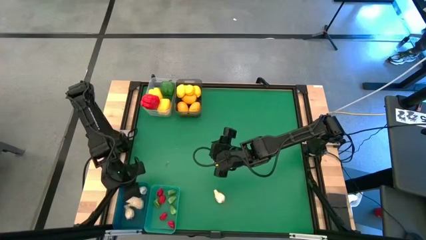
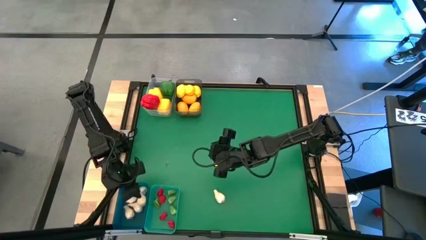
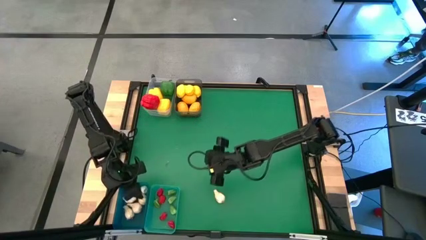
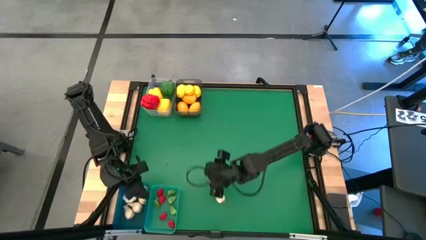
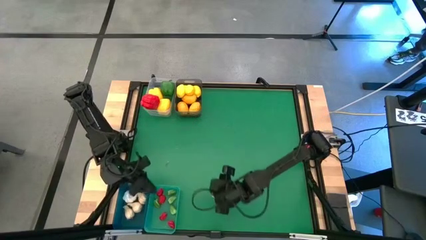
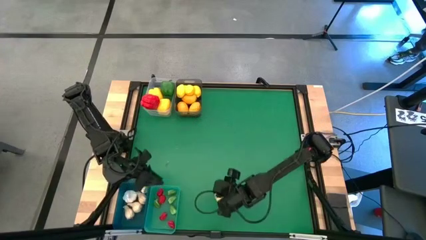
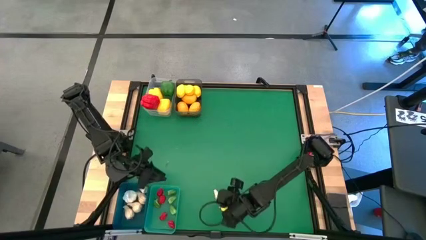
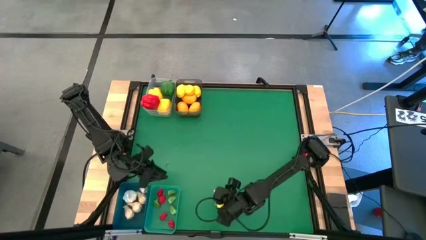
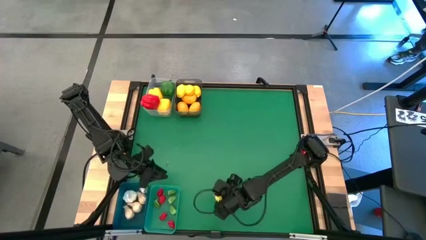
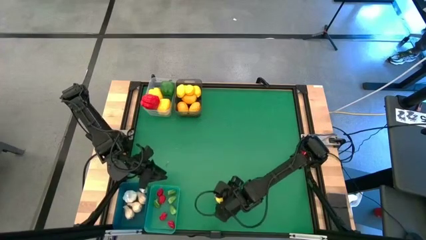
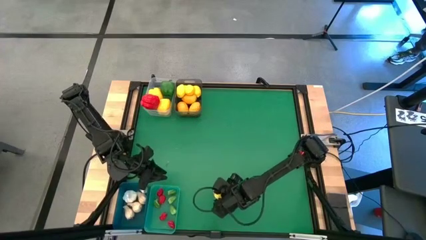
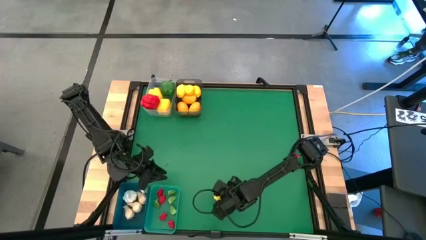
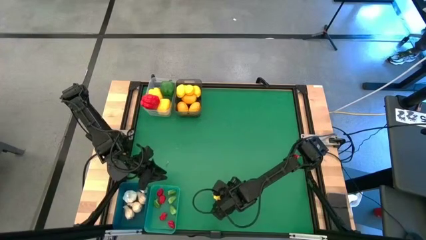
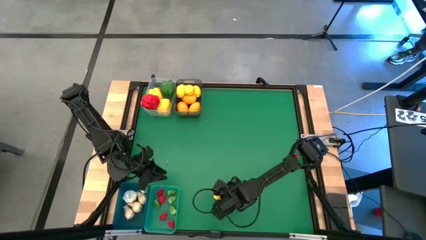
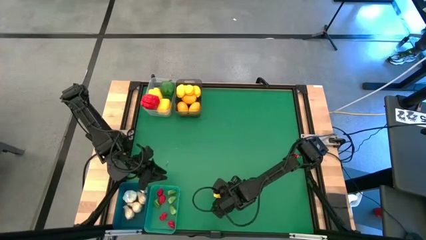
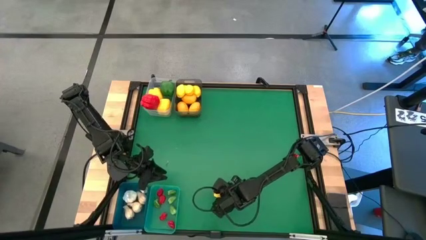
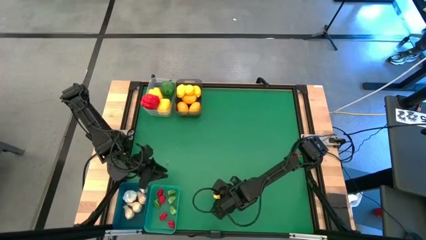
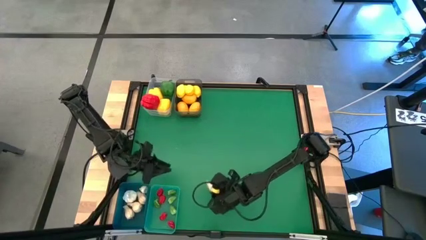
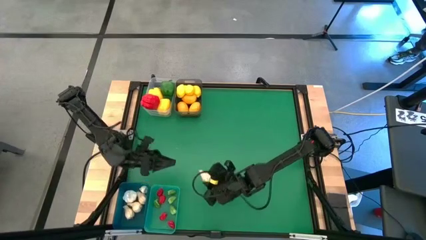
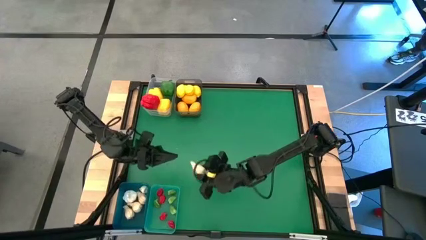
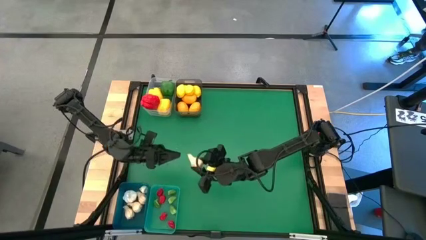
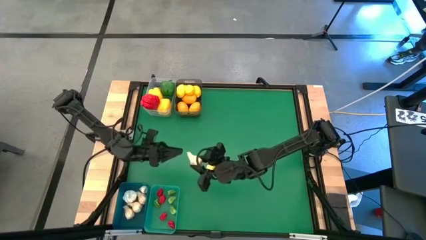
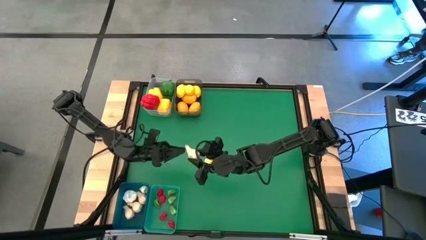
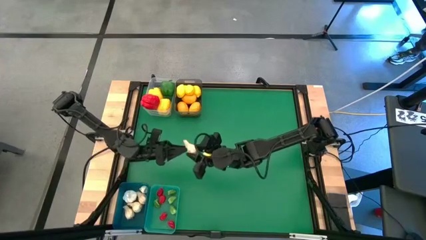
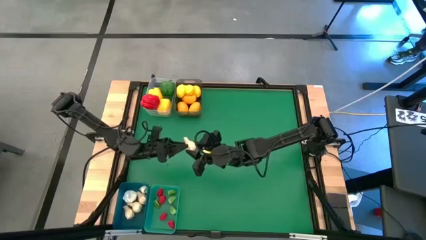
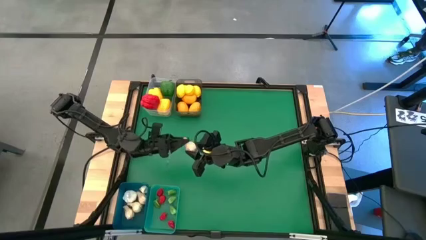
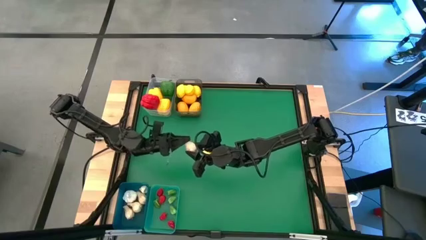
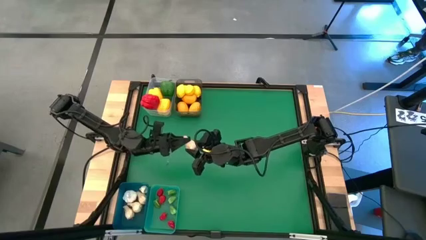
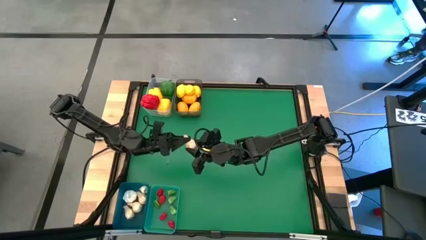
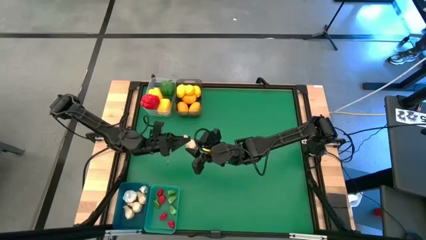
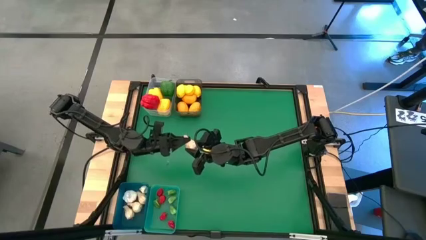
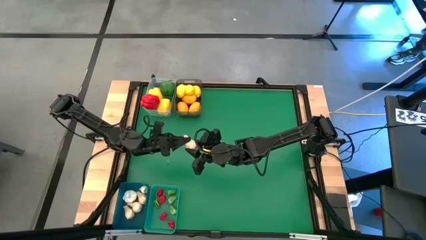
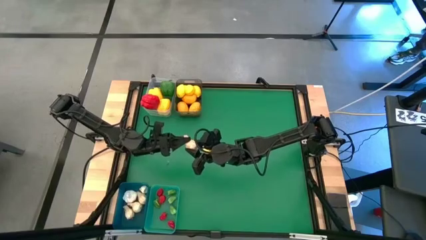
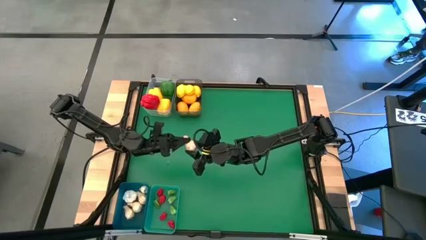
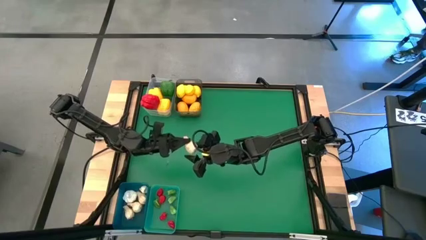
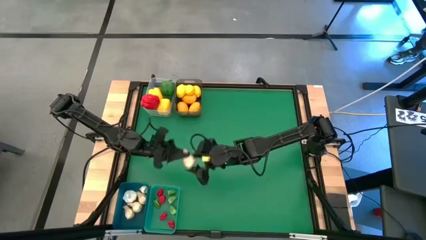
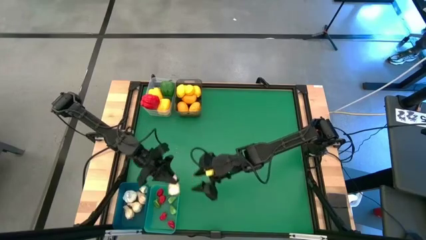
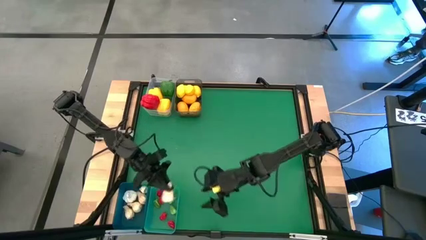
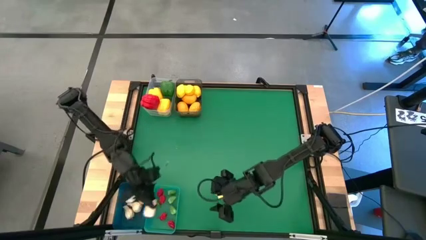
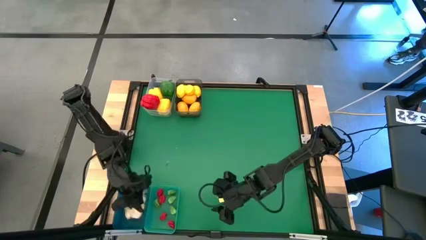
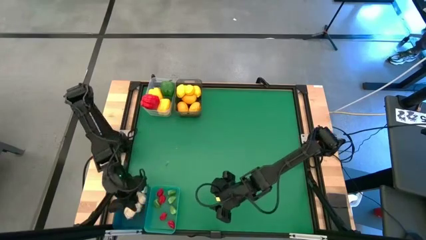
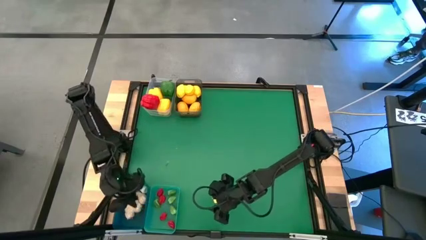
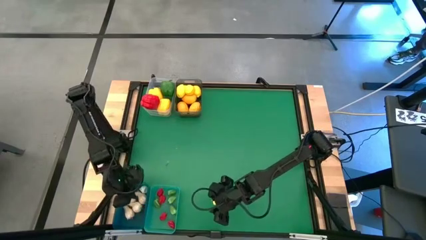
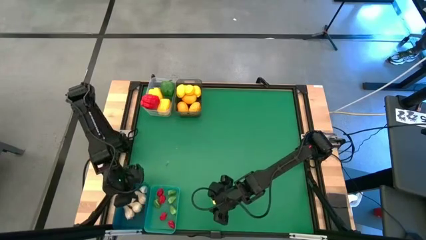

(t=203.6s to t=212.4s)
Task: Sort produce into baskets
Put the white garlic into the blue bin

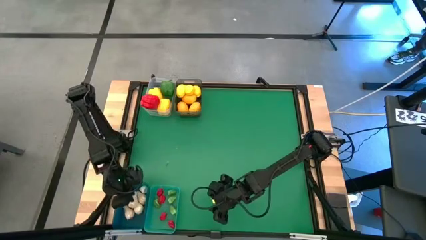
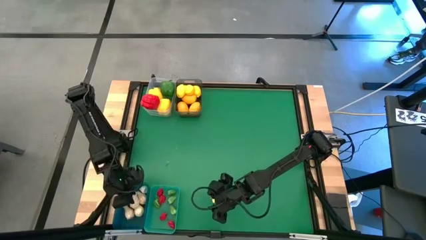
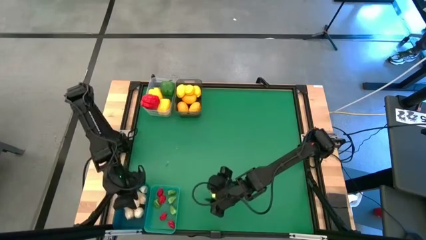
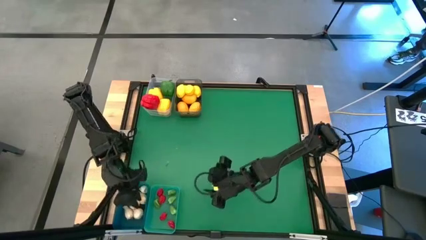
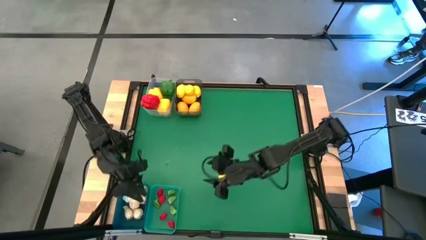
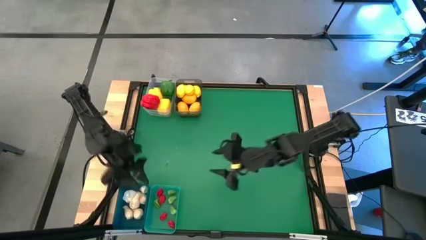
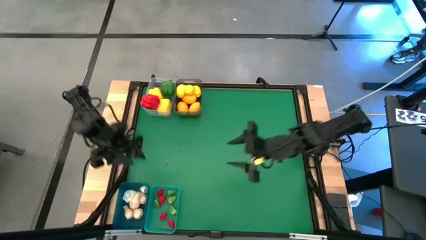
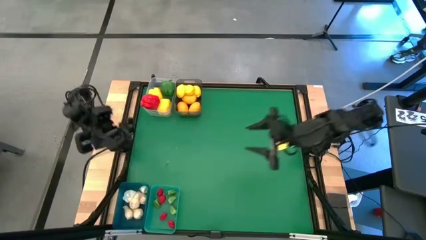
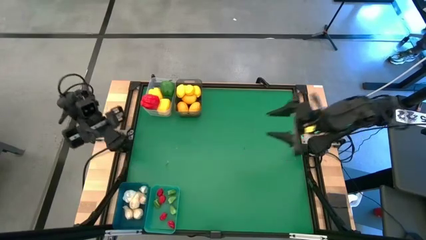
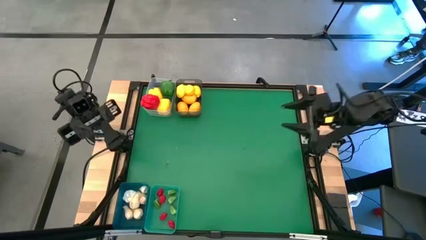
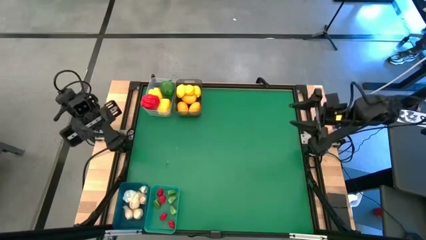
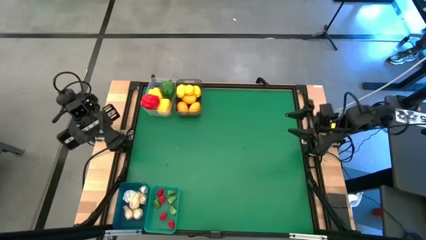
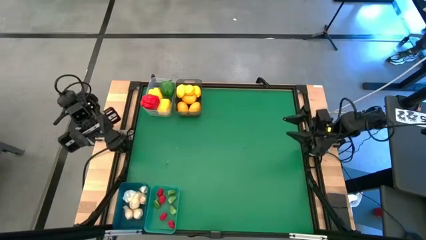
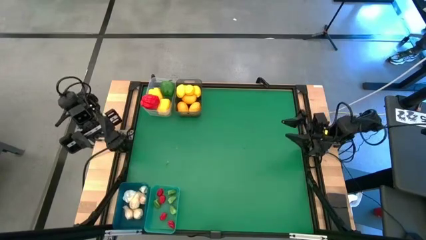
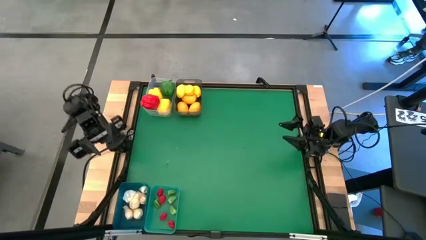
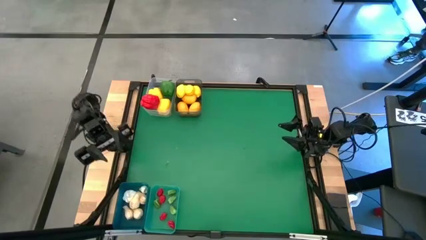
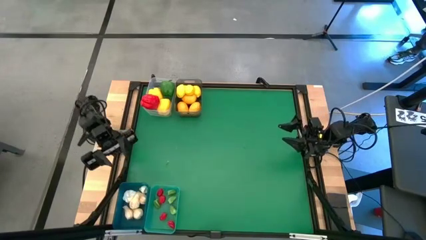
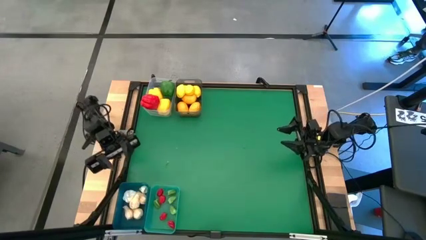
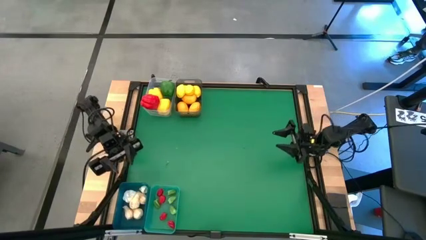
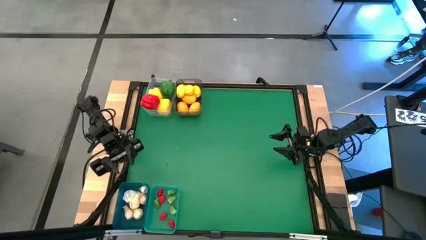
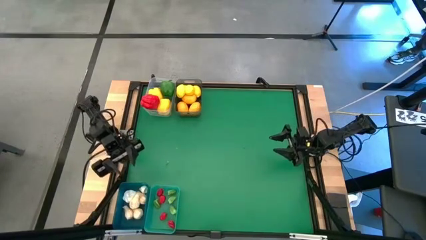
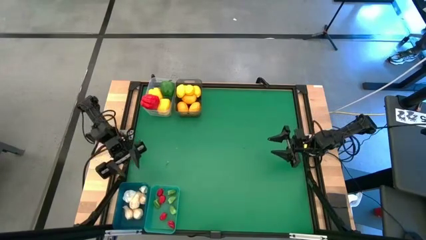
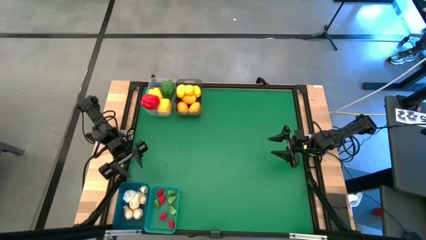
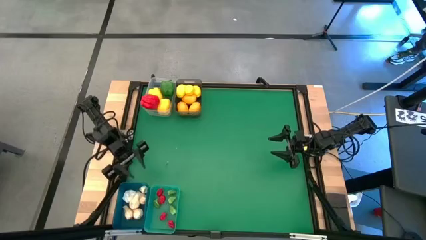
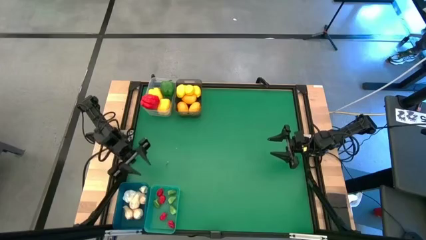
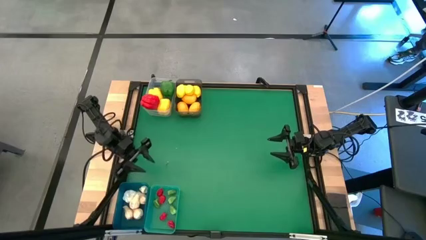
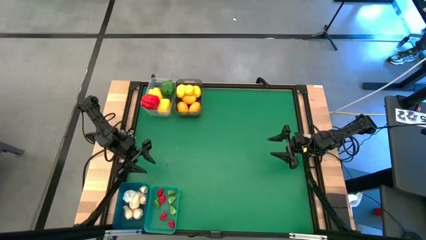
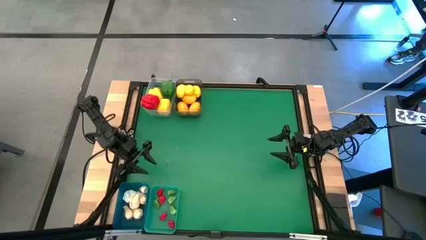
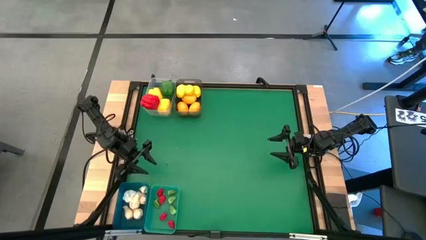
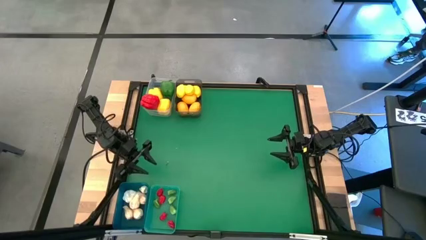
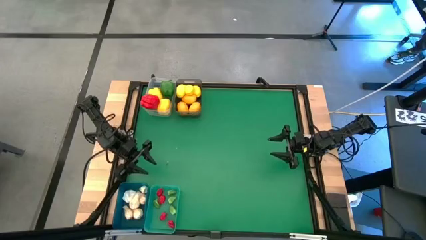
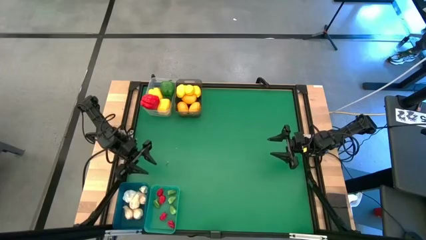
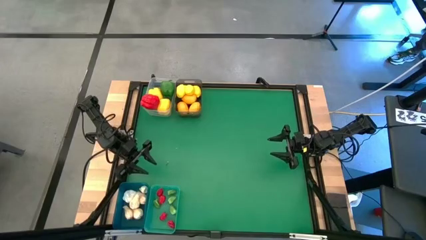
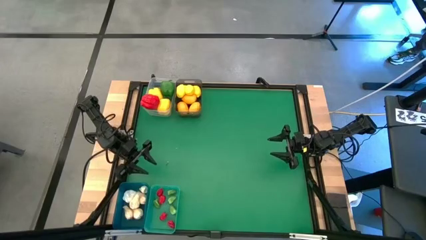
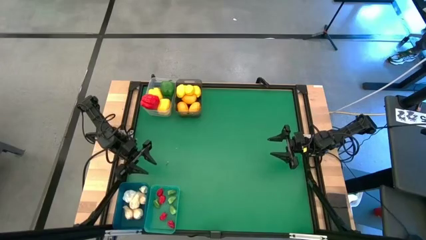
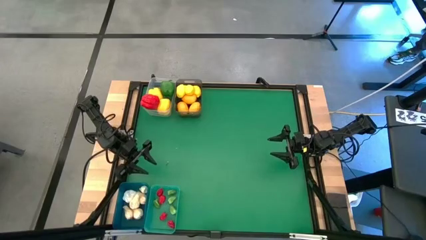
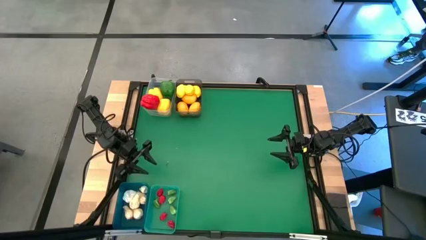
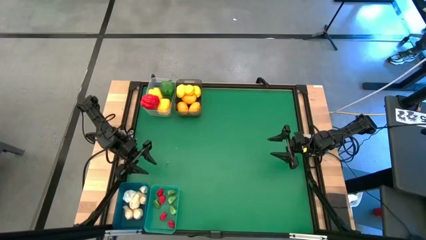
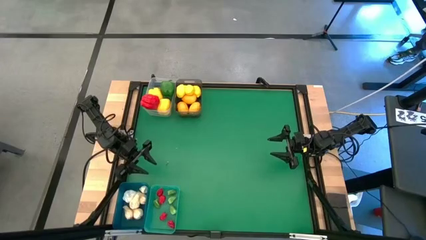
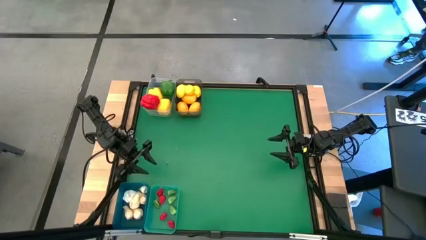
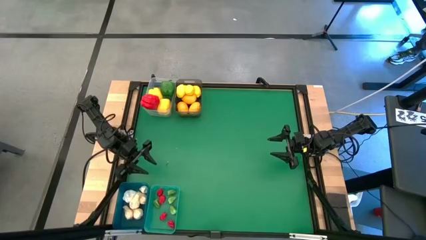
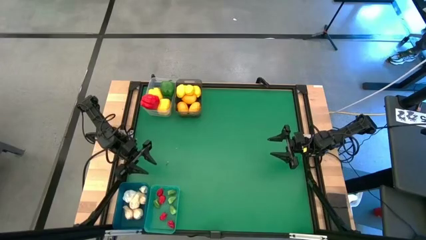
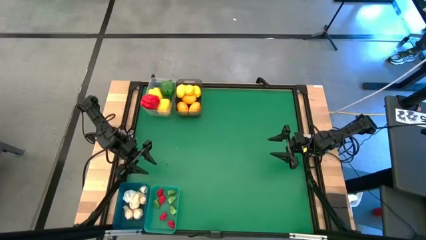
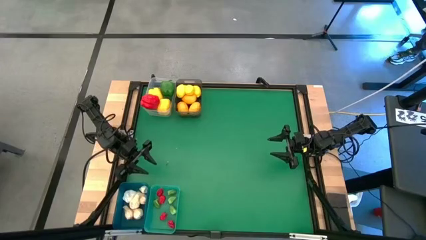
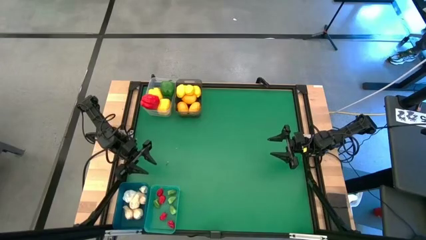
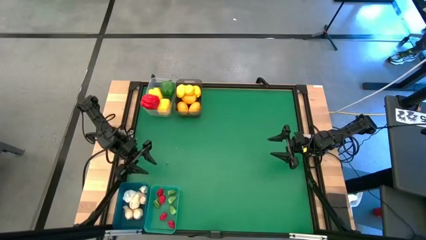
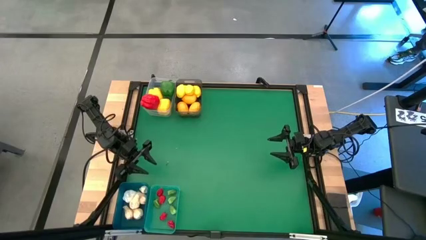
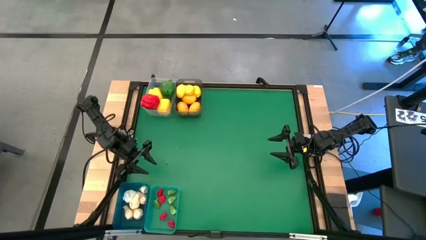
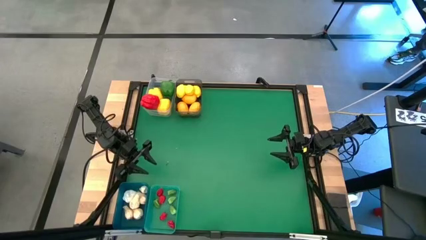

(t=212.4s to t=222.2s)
Return to Home Position
